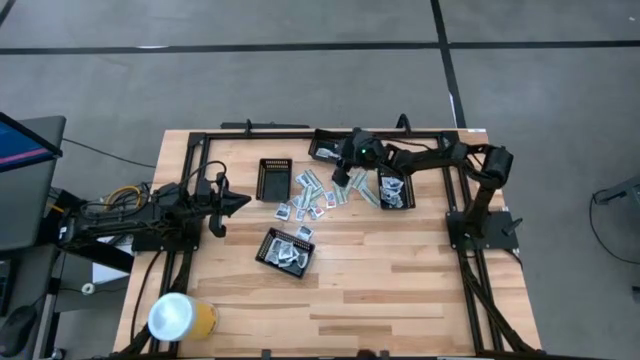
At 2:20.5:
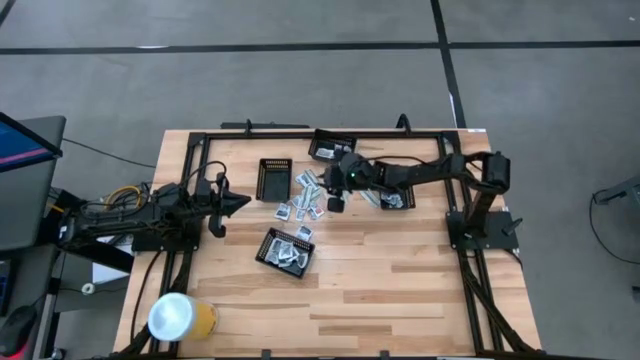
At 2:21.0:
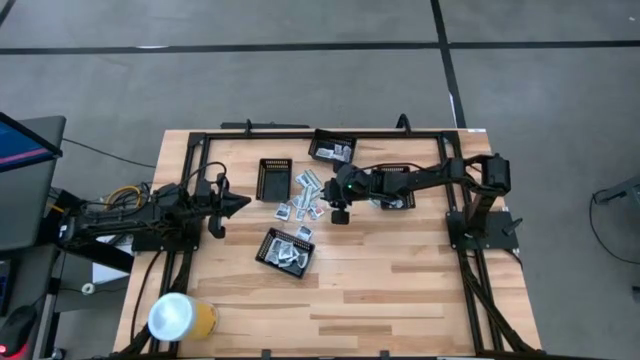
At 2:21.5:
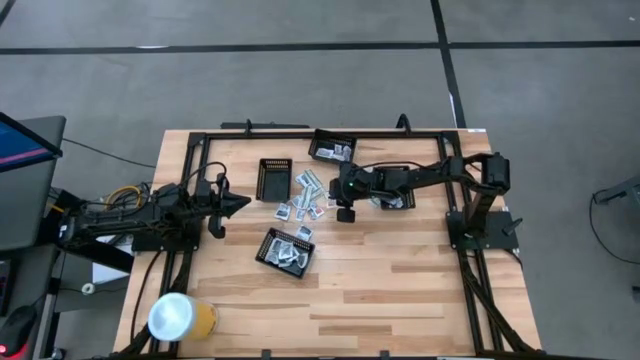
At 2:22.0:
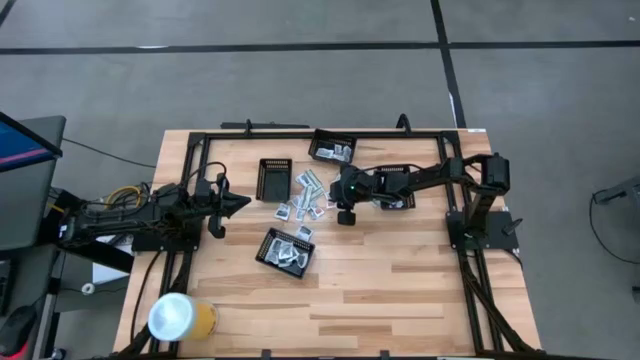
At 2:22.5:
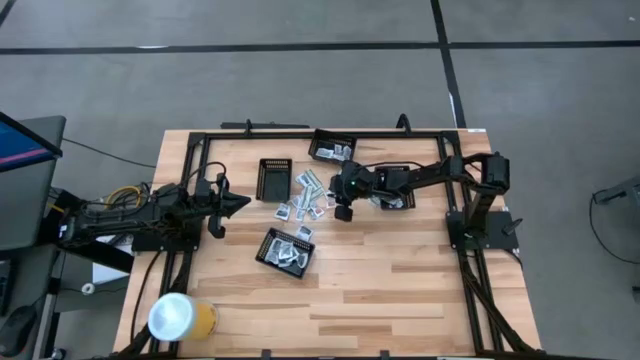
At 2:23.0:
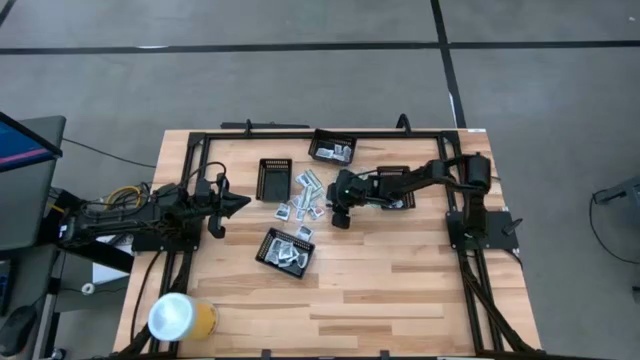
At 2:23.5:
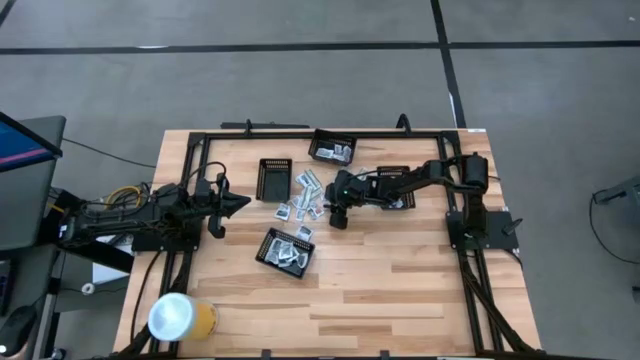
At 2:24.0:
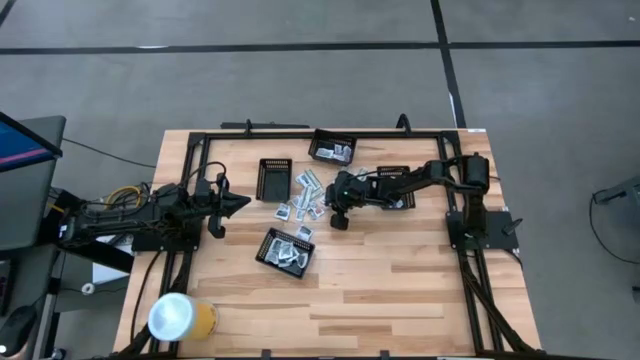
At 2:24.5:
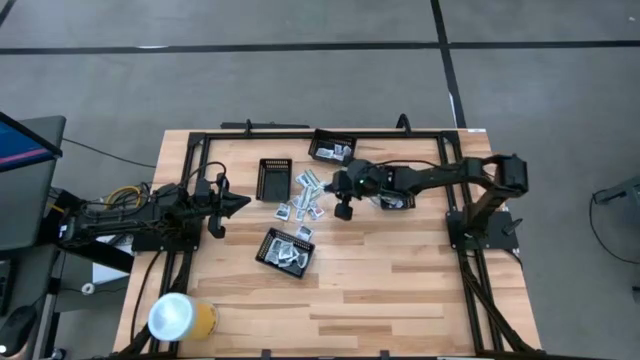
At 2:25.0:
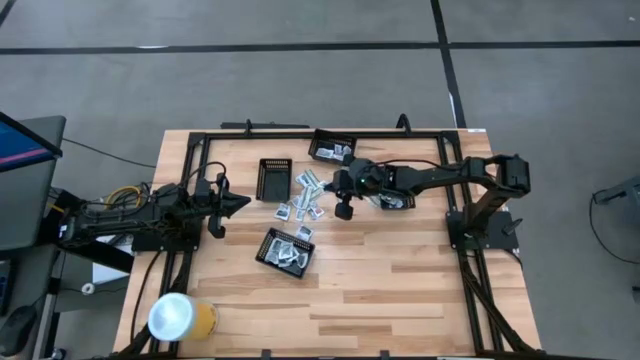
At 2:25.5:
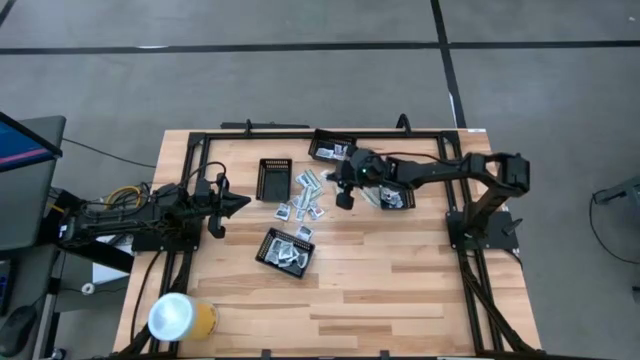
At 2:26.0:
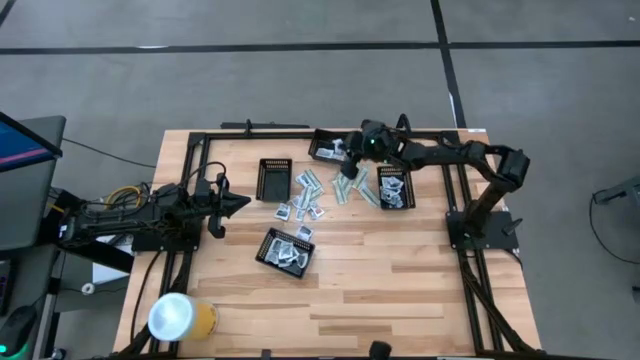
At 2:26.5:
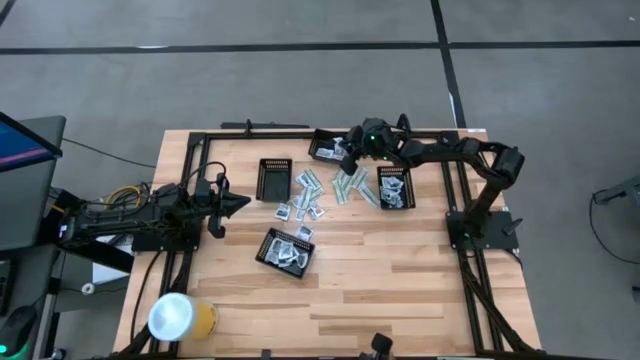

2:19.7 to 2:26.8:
Task: Pick & Place First Aid Supplies
Put the orange ointment pack into the top black bin

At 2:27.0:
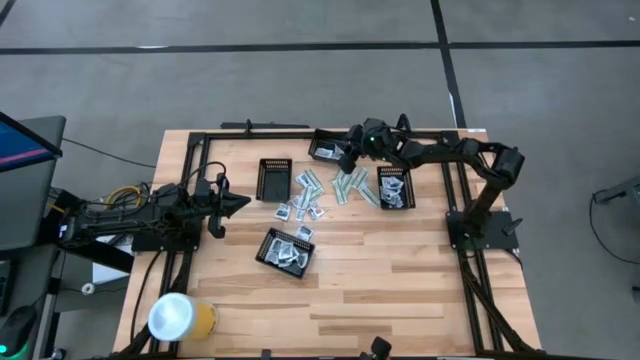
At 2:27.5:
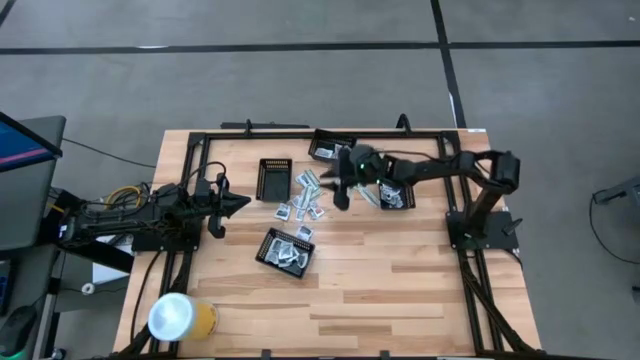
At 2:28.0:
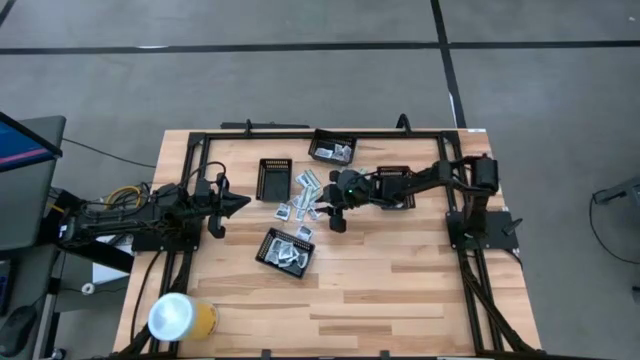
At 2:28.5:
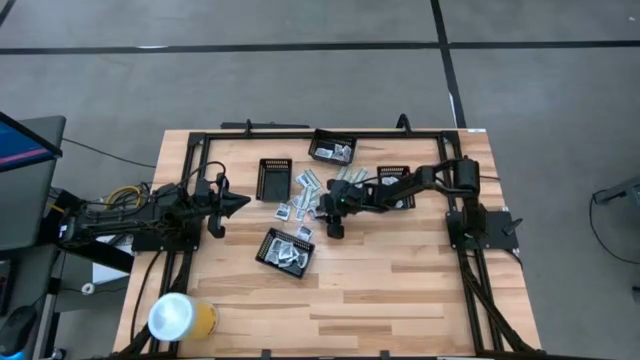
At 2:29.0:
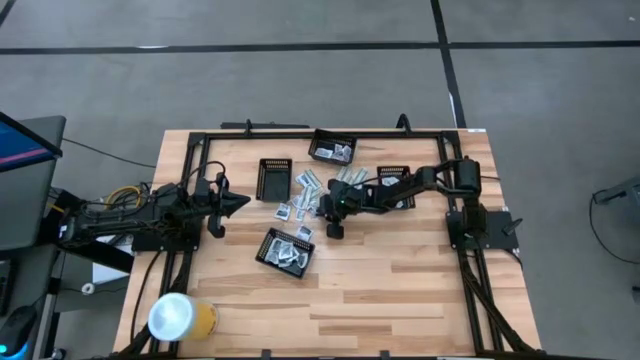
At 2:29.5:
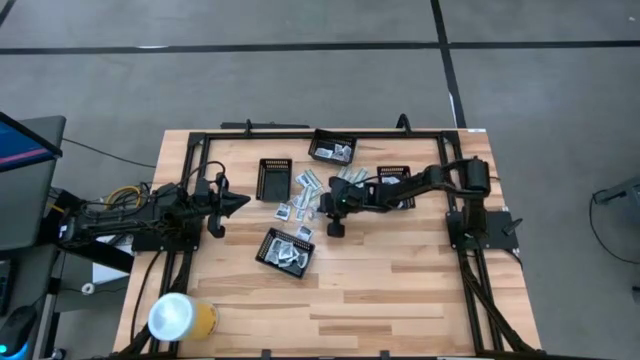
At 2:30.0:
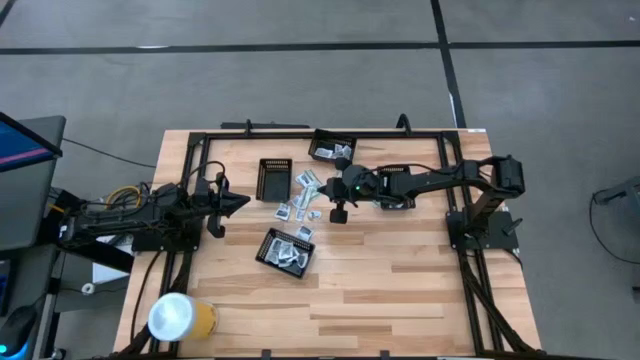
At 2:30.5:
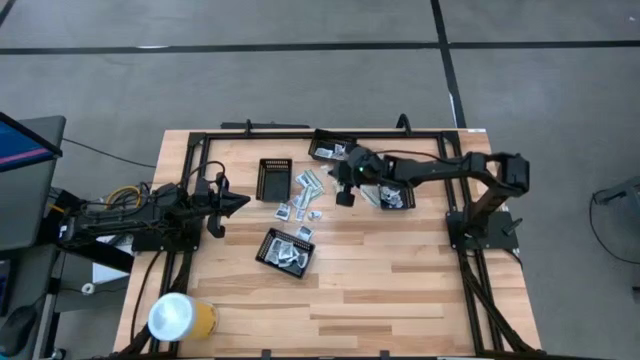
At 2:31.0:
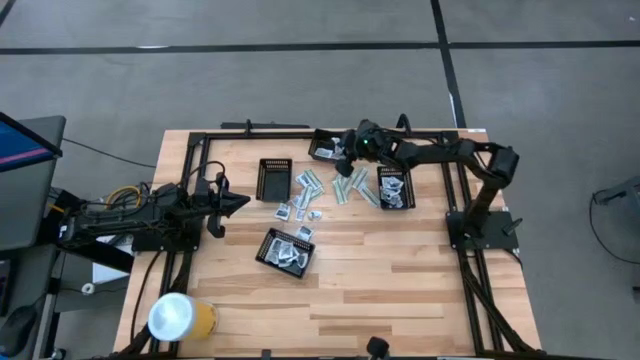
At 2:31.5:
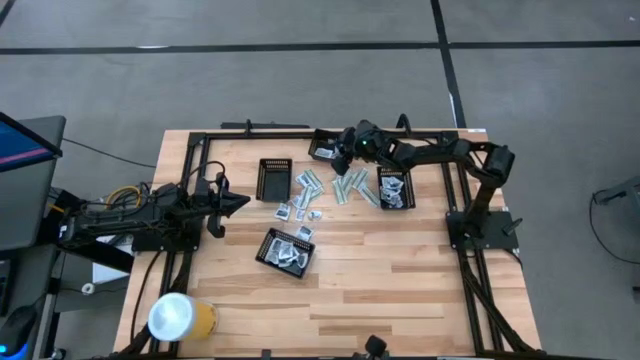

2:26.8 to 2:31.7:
Put the orange ointment pack into the top black bin

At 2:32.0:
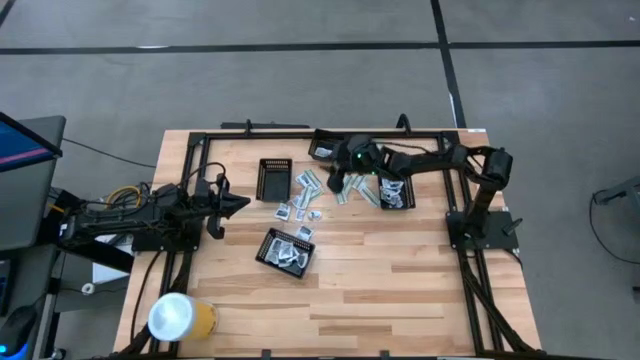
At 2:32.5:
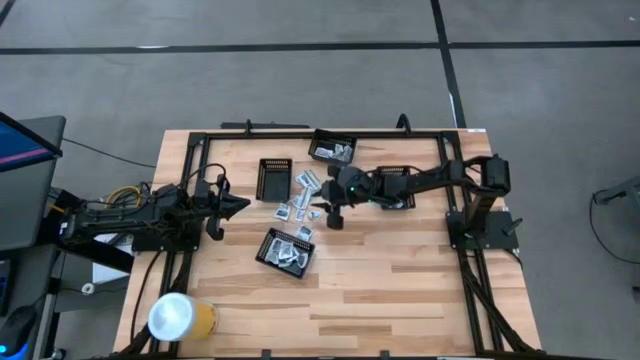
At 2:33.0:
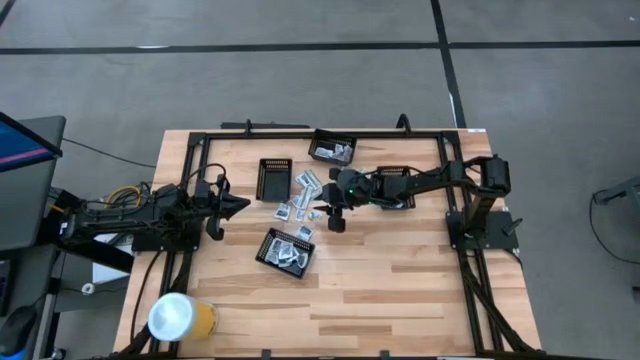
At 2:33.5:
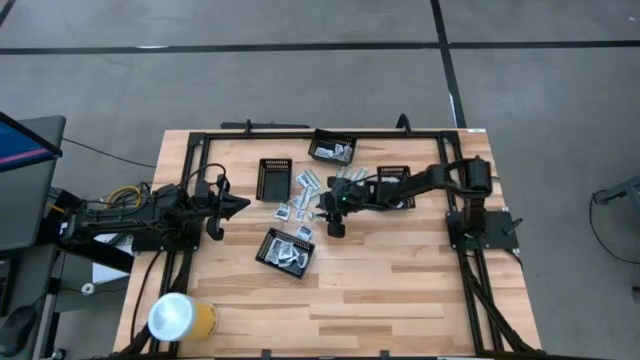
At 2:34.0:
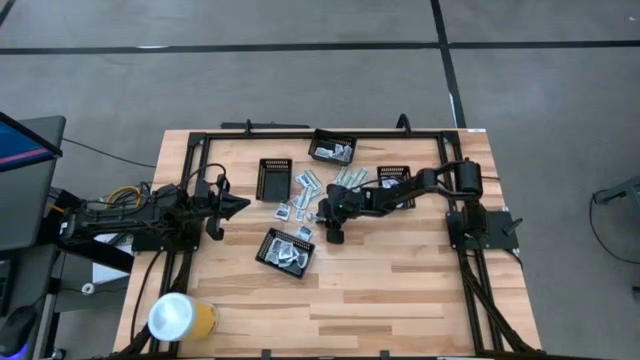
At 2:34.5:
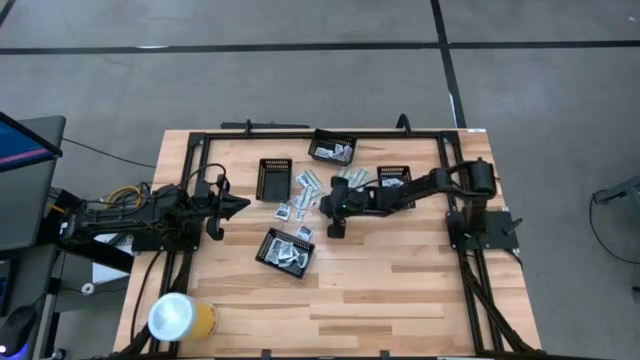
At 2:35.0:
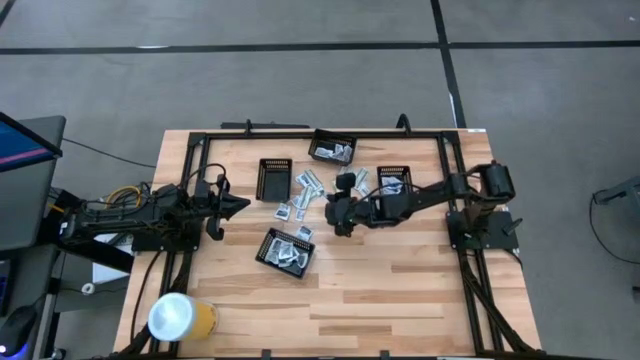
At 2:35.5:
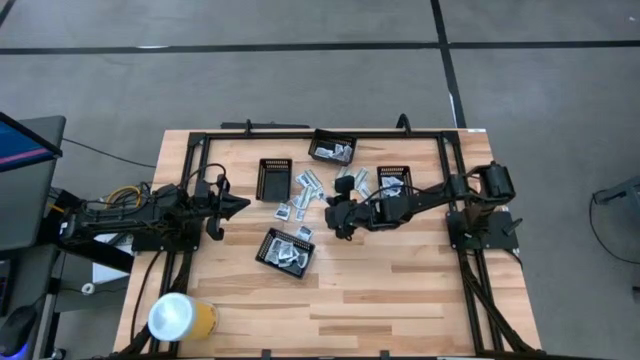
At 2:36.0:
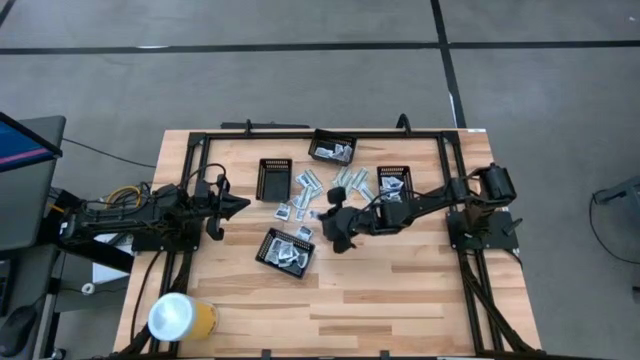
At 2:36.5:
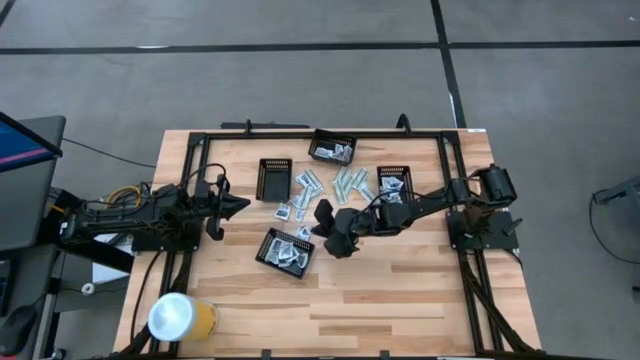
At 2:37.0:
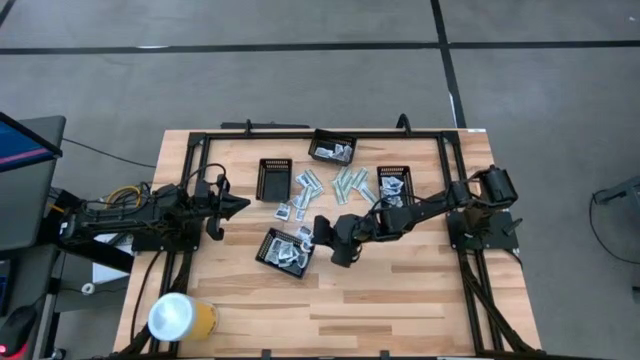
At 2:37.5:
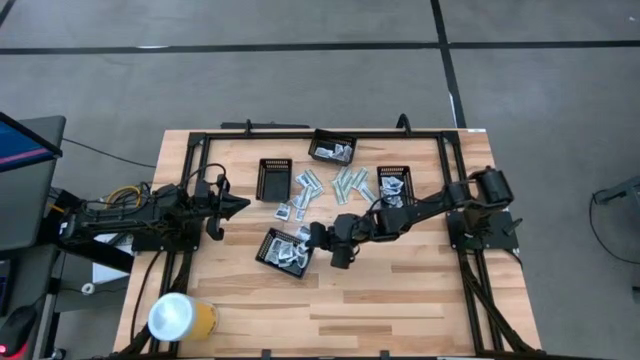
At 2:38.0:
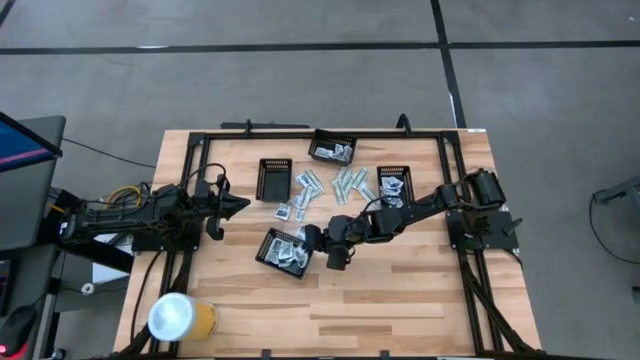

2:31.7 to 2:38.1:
Put the white towelette pack into the bottom black bin
